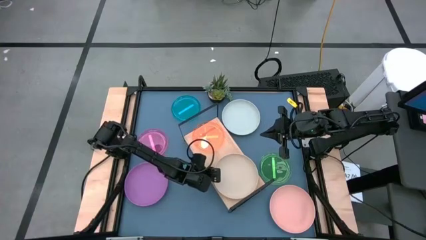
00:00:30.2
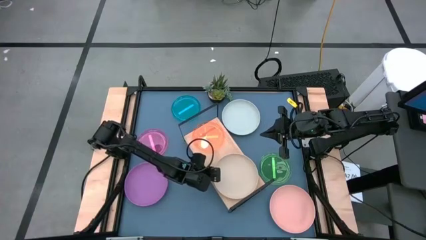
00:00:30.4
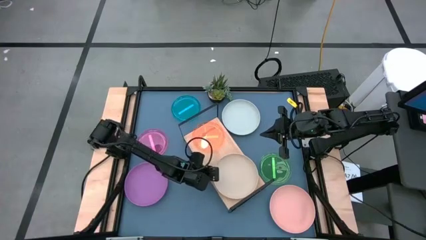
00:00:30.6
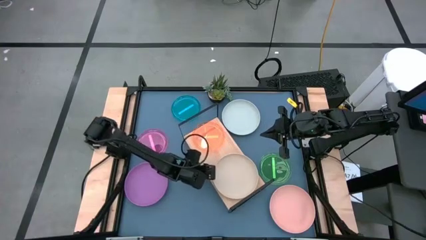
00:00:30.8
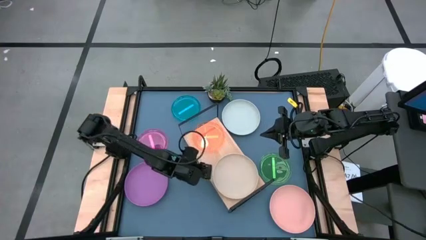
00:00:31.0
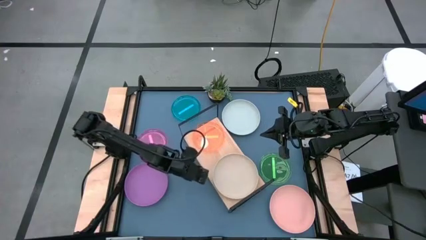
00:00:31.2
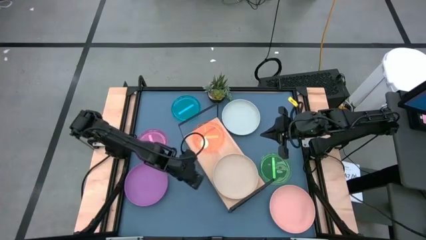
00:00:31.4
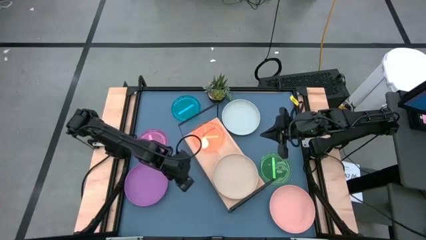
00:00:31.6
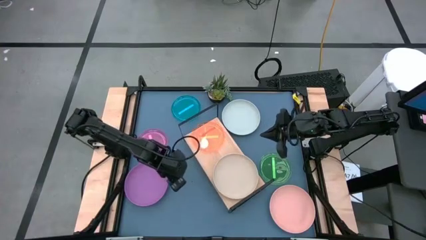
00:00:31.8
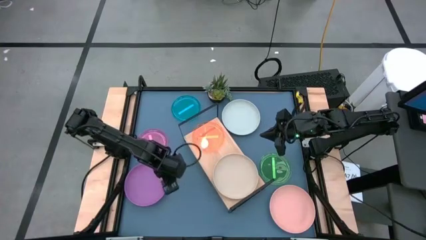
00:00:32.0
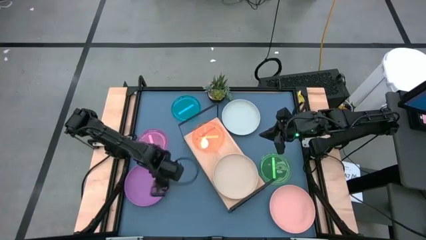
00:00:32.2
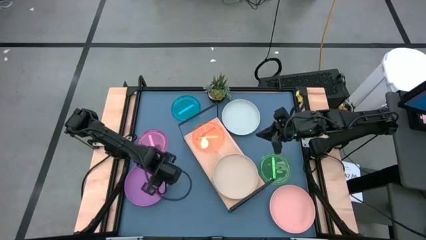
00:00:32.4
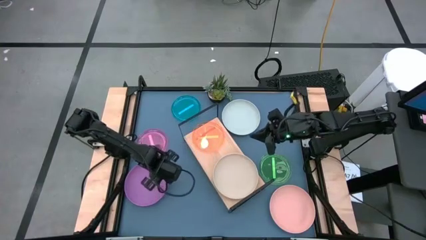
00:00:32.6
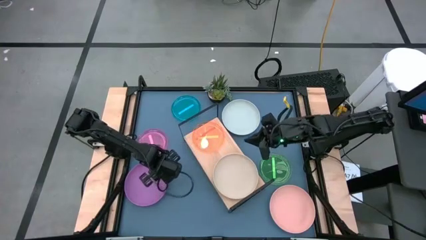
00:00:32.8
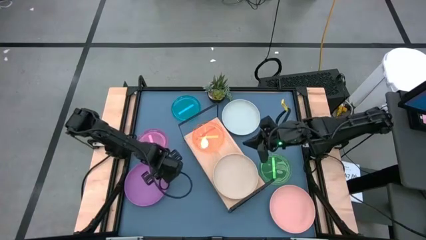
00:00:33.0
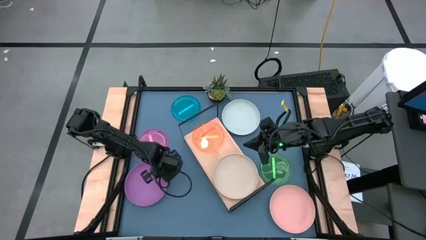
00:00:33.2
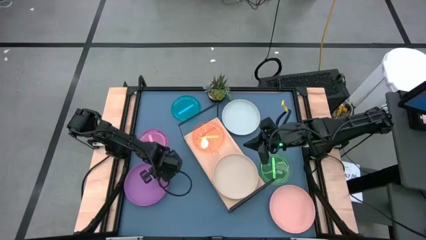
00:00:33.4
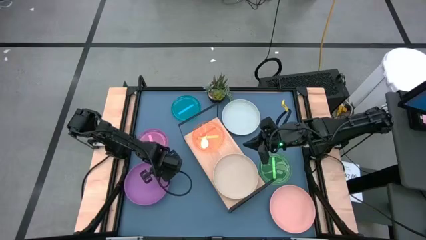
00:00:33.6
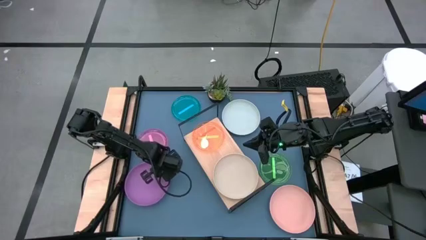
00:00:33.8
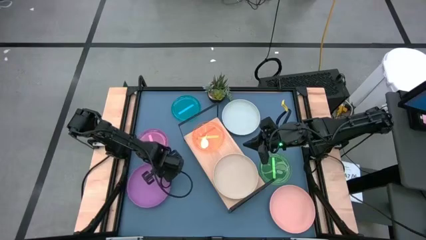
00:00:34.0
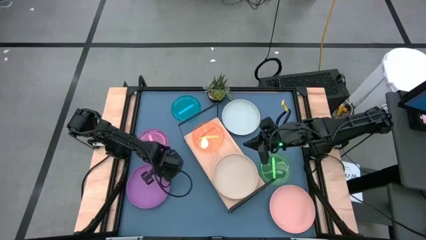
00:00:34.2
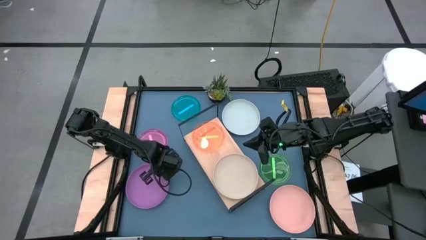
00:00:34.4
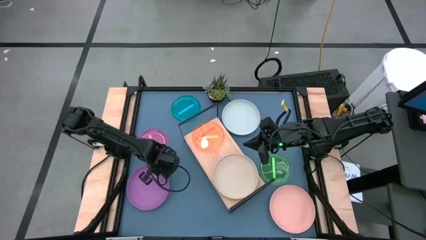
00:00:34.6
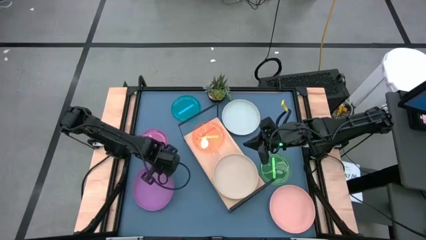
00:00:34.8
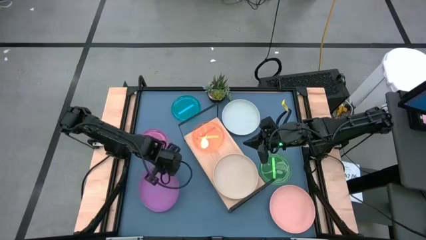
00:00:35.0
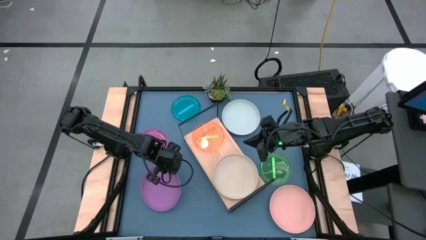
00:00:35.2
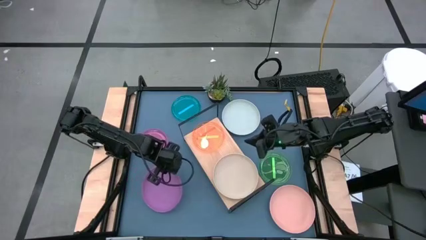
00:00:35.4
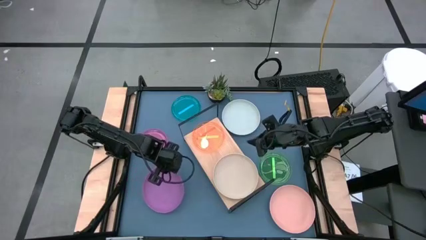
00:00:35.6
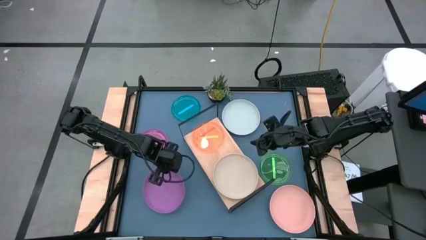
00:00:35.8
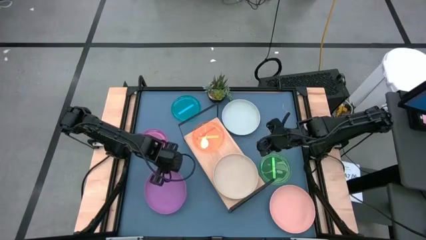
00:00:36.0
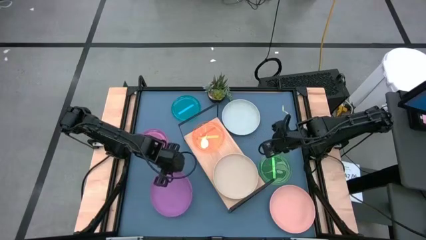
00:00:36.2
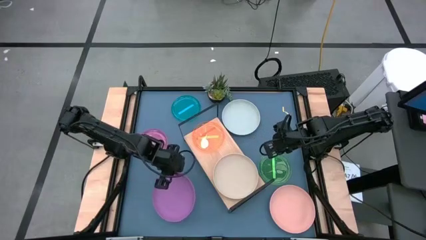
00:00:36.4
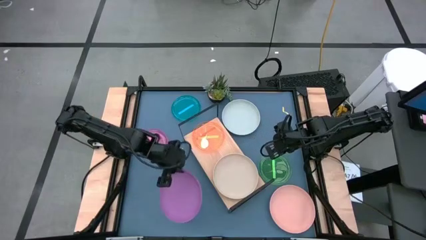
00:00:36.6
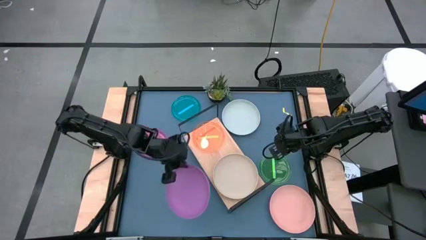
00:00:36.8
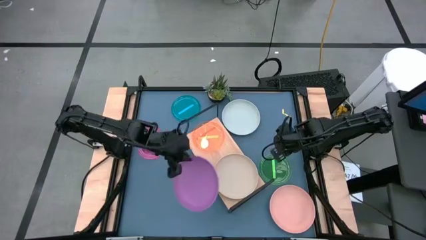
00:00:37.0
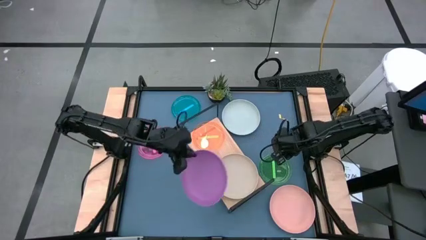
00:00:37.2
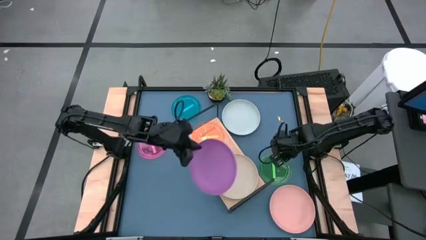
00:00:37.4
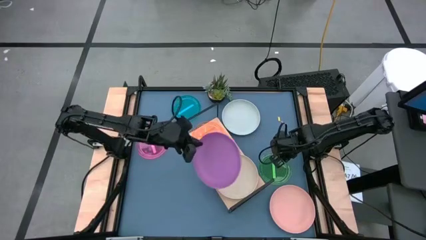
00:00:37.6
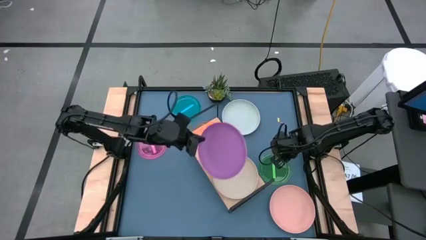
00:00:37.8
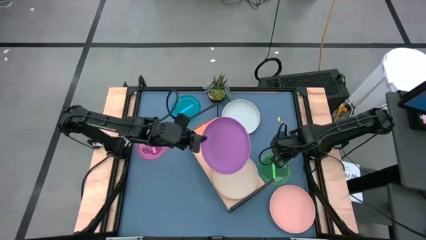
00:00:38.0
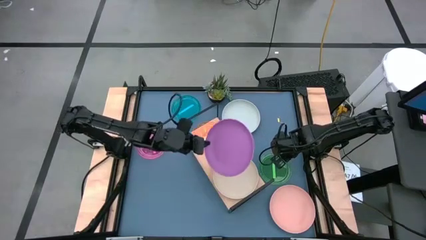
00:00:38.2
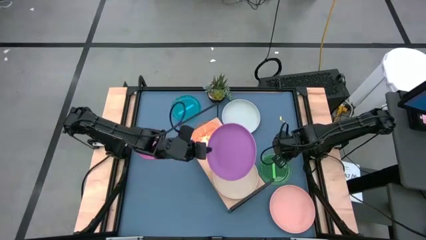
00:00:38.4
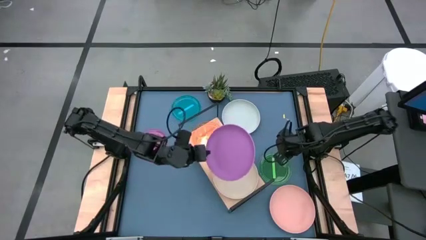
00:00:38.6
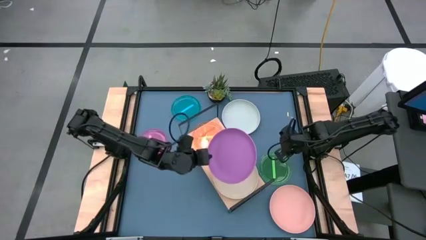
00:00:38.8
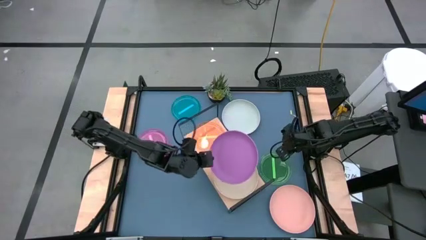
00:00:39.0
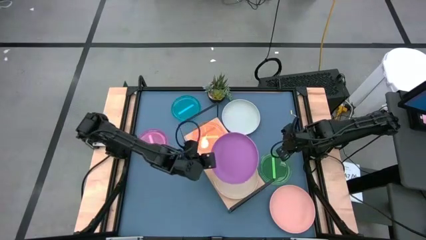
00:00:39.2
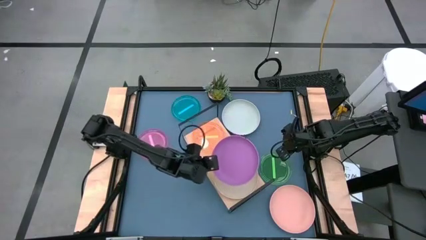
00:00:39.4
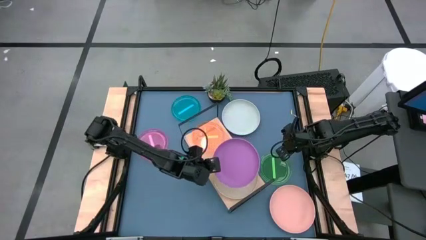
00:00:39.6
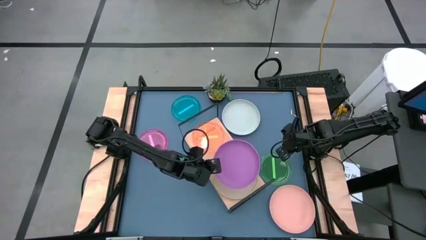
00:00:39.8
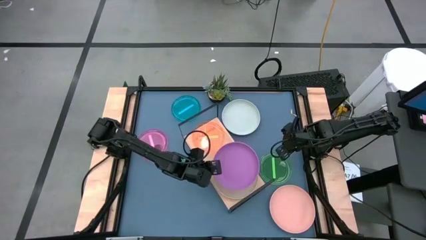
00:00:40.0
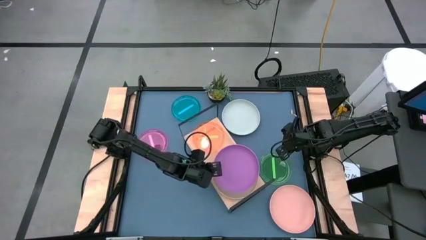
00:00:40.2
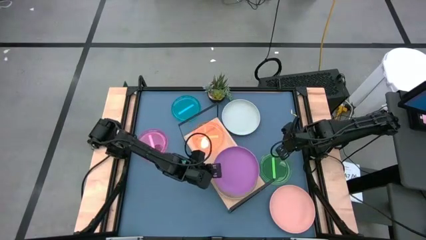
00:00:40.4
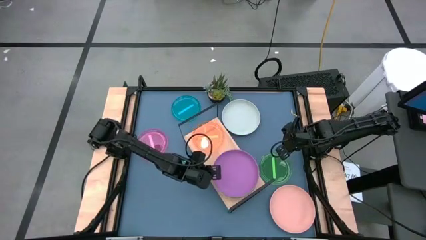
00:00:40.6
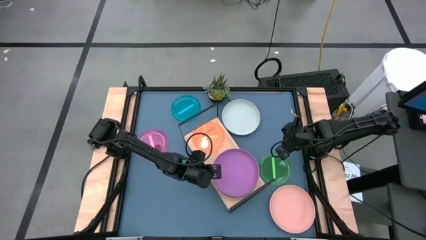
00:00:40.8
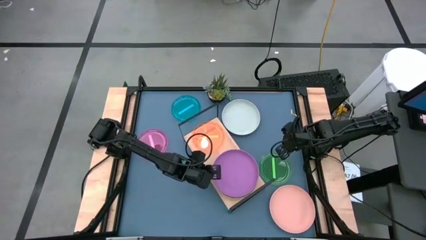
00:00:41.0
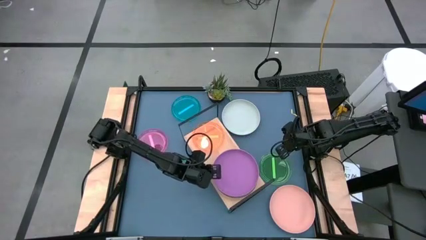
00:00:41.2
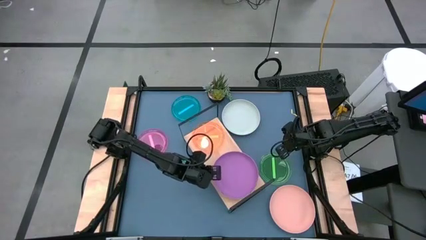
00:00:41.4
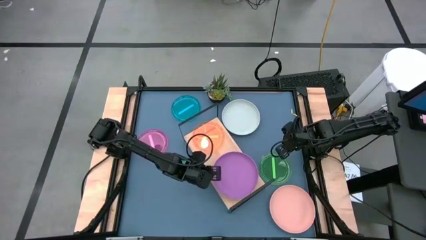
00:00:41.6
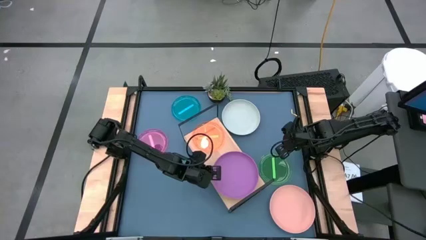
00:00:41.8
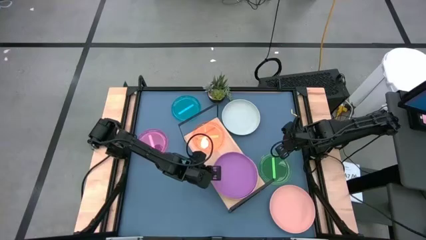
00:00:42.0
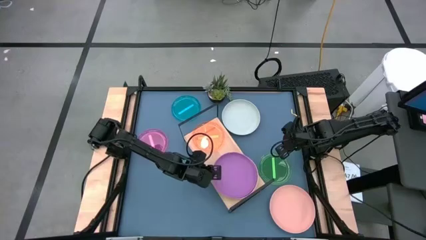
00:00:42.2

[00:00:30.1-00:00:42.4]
Task: Place and stack plates onto a shelf
Stack the large violet plate on the large gray plate on the shelf

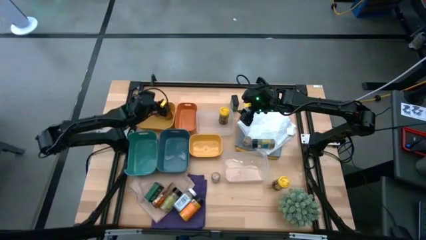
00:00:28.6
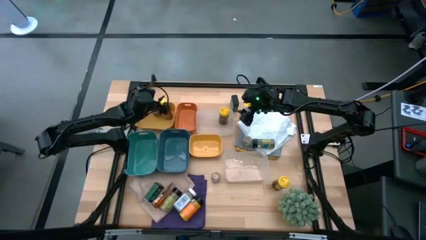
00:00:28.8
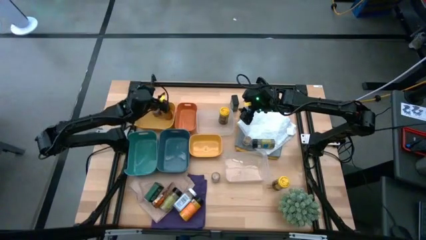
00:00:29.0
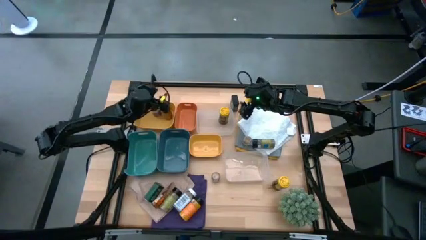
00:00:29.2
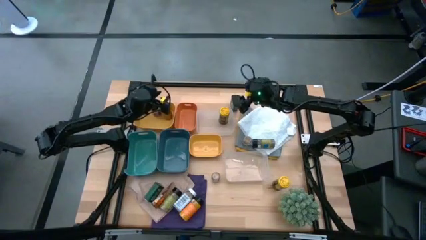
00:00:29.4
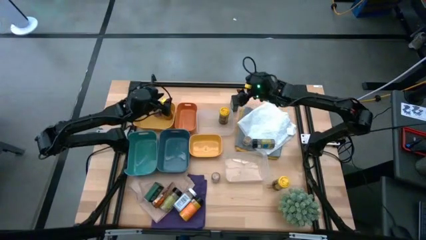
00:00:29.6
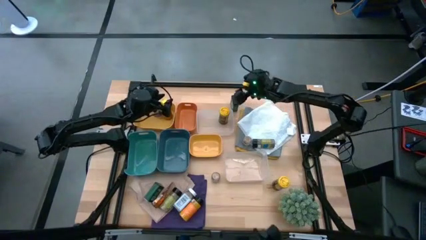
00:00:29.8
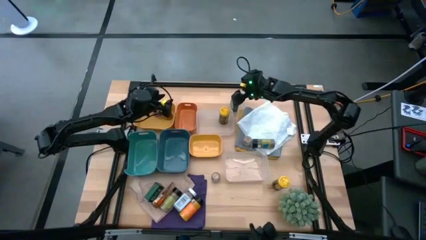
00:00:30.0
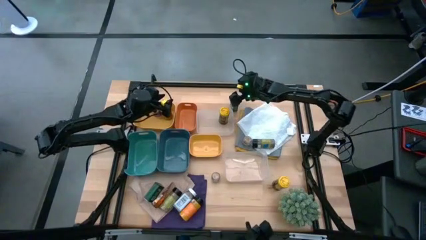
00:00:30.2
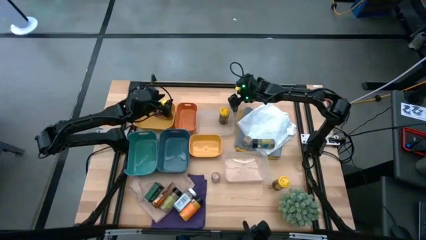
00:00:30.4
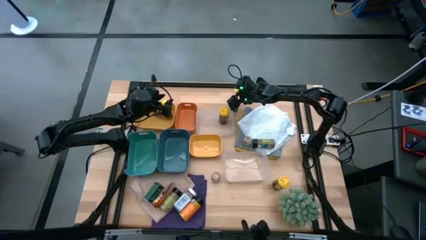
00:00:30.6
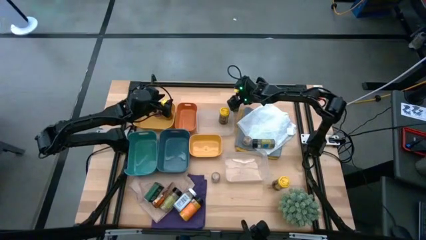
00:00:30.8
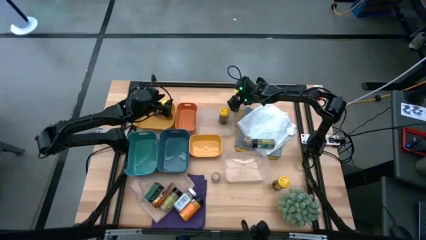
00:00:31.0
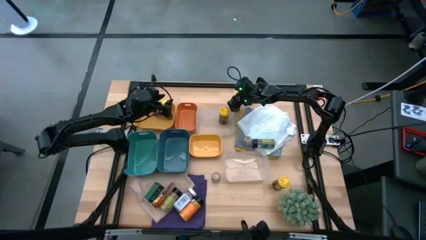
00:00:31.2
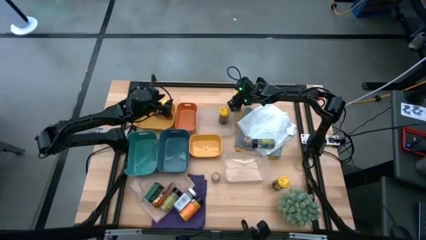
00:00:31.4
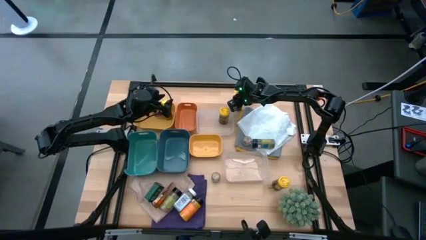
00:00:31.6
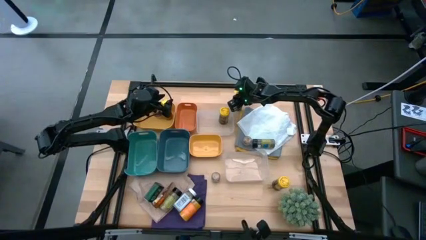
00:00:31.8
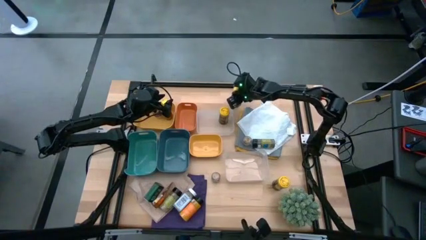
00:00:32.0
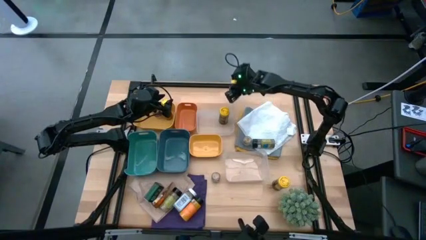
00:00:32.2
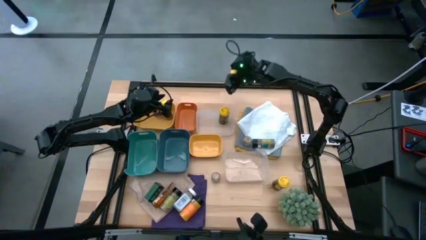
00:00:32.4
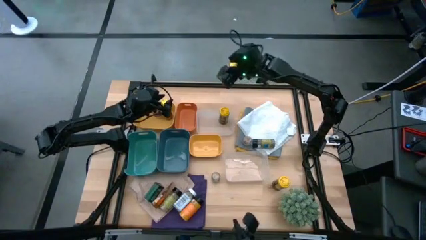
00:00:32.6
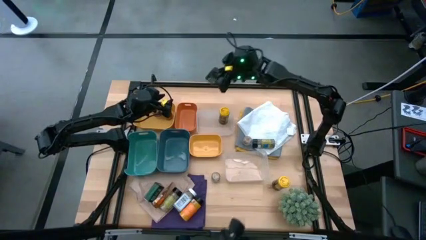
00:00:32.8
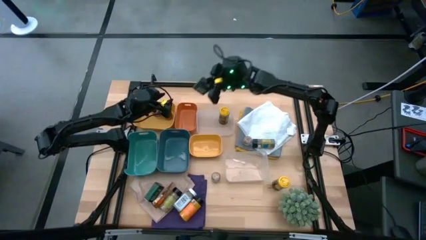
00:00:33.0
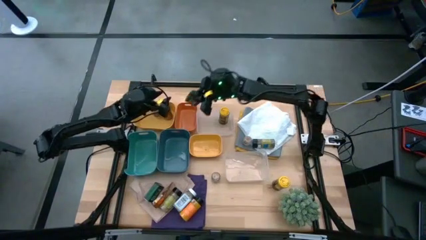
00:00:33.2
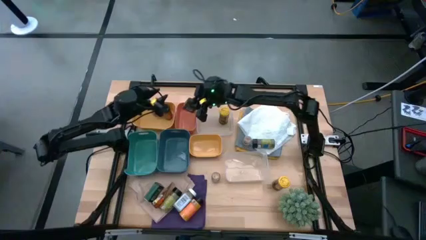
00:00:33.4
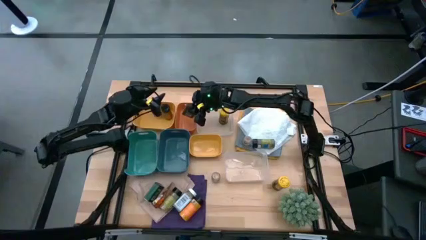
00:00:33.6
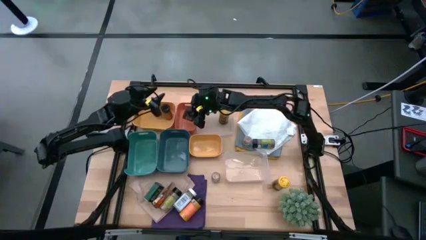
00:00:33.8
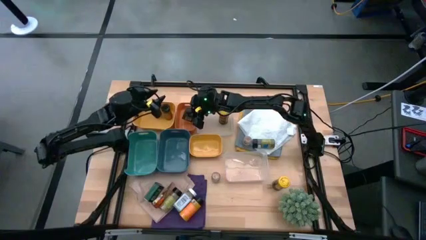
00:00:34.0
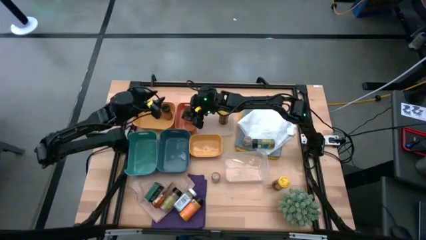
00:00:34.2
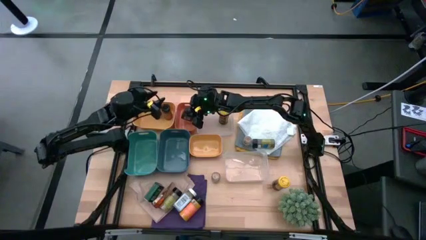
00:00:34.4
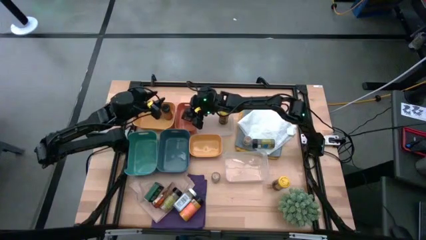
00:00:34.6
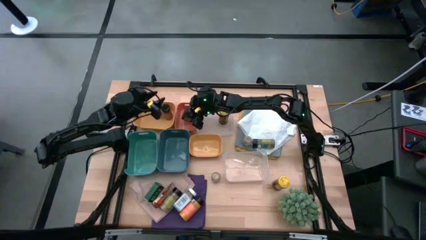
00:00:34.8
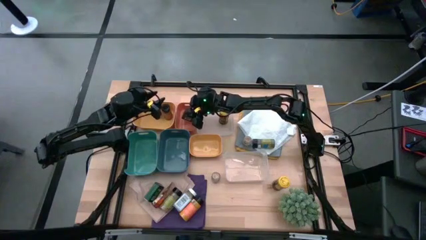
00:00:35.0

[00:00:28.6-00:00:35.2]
Task: Sort spices by type
Put the top green spice can into the orange bin
